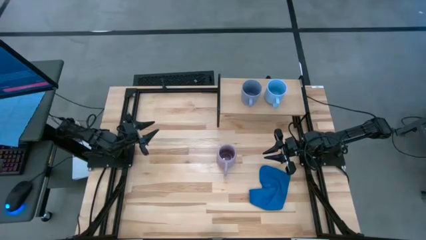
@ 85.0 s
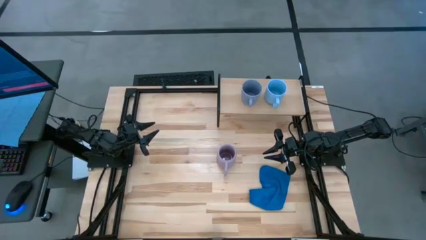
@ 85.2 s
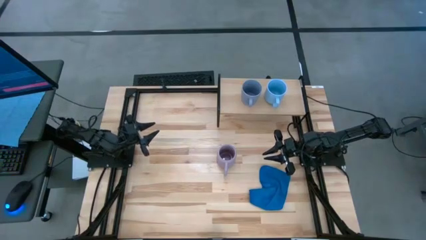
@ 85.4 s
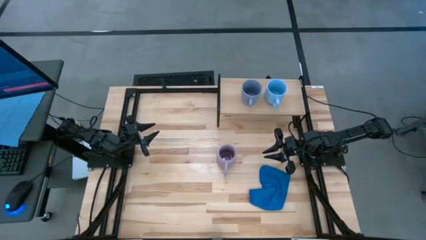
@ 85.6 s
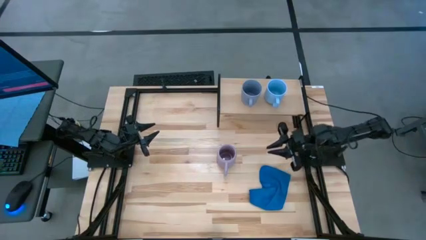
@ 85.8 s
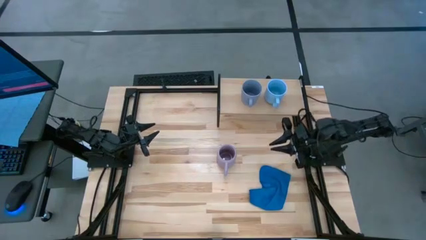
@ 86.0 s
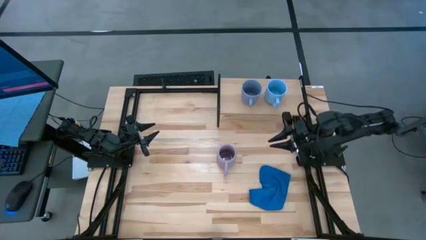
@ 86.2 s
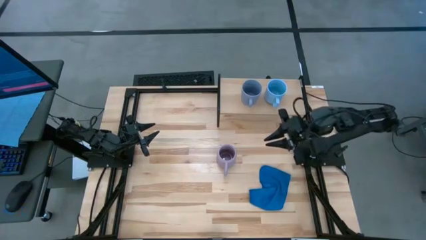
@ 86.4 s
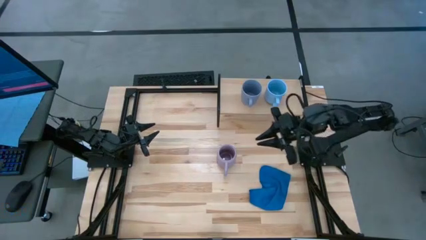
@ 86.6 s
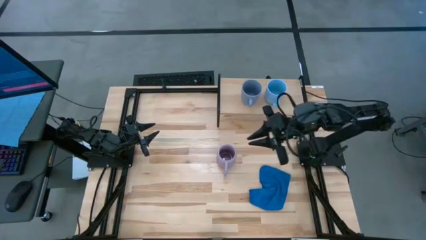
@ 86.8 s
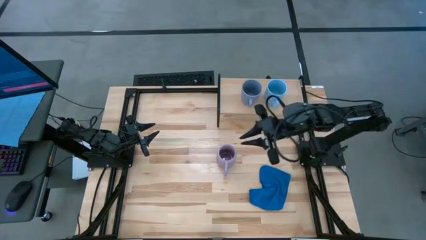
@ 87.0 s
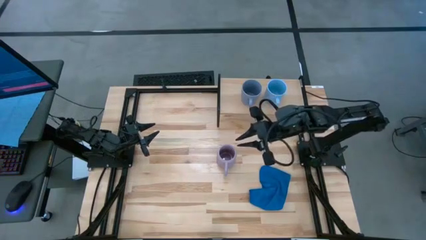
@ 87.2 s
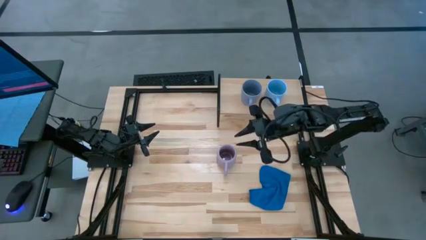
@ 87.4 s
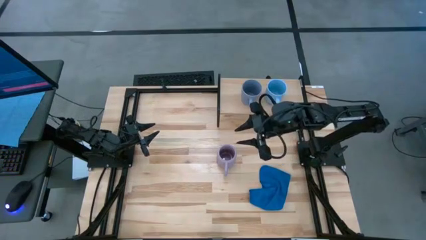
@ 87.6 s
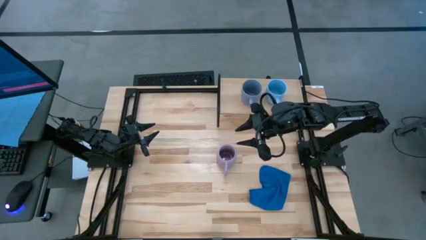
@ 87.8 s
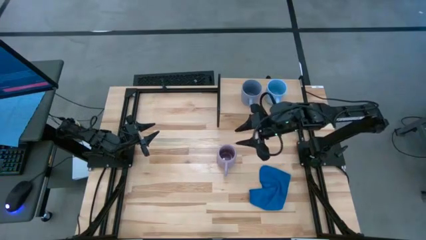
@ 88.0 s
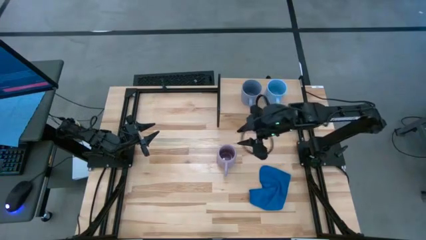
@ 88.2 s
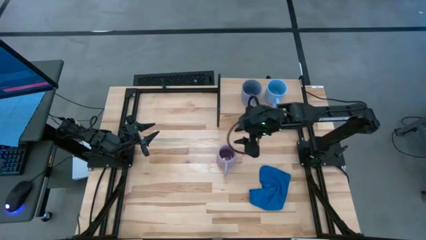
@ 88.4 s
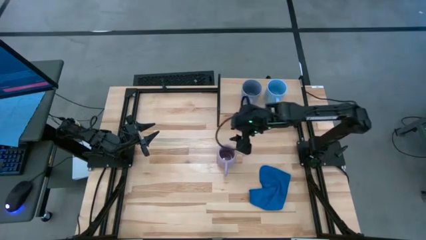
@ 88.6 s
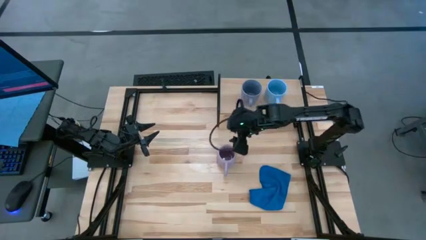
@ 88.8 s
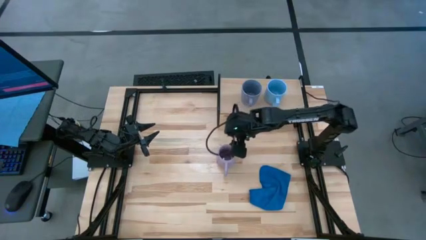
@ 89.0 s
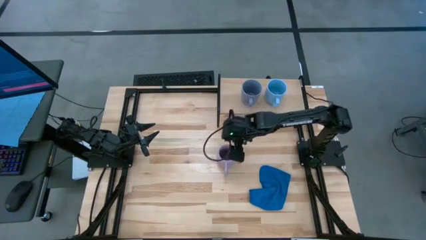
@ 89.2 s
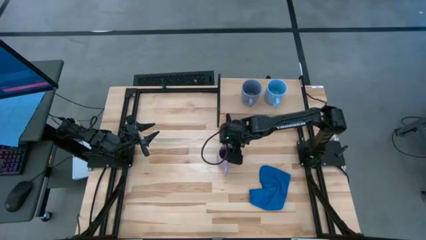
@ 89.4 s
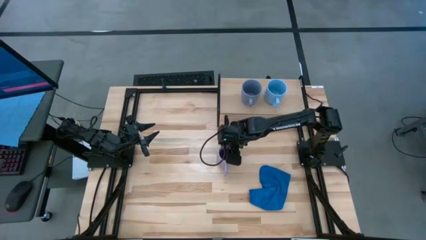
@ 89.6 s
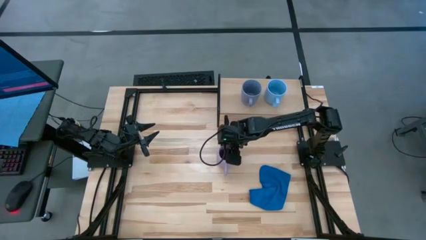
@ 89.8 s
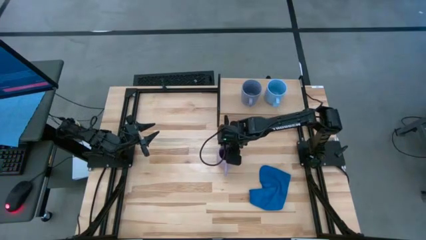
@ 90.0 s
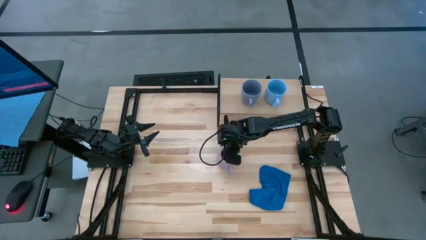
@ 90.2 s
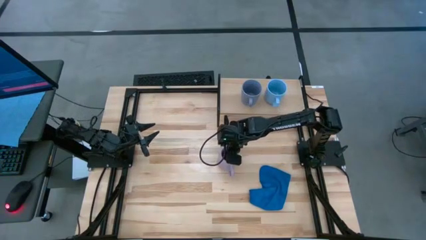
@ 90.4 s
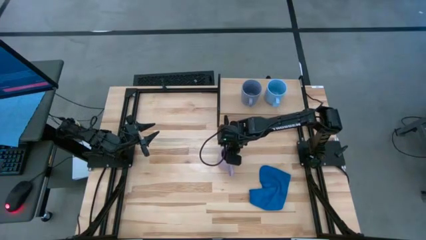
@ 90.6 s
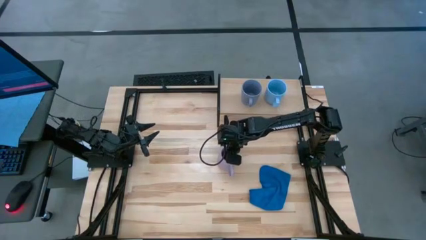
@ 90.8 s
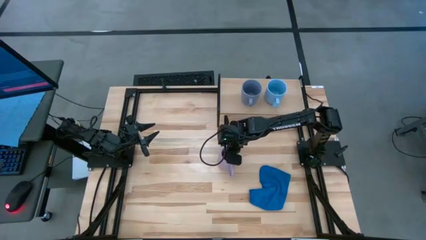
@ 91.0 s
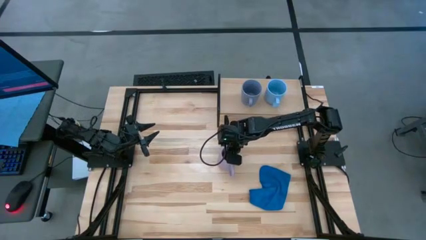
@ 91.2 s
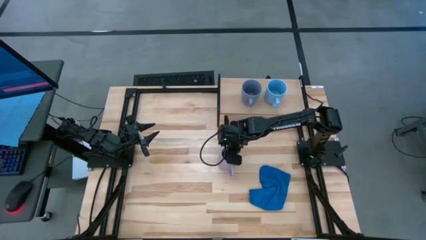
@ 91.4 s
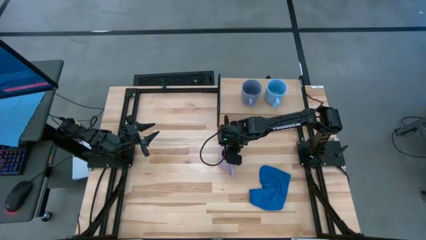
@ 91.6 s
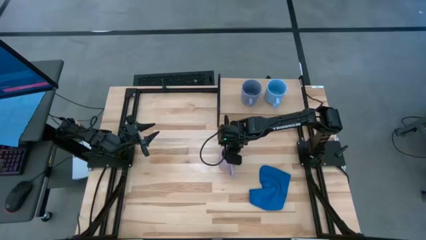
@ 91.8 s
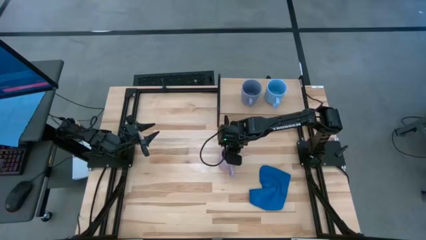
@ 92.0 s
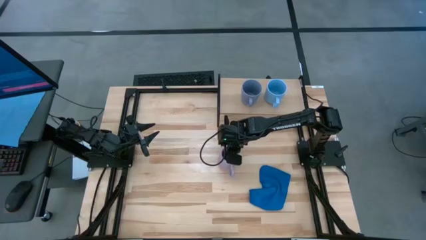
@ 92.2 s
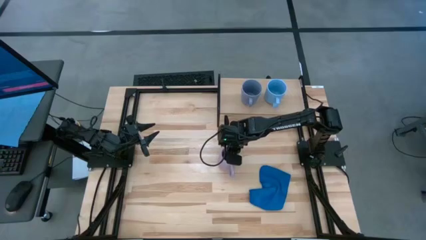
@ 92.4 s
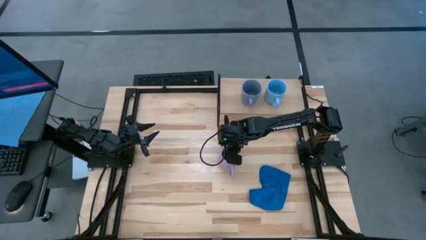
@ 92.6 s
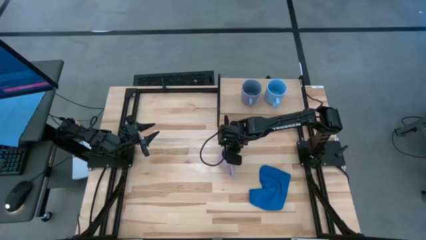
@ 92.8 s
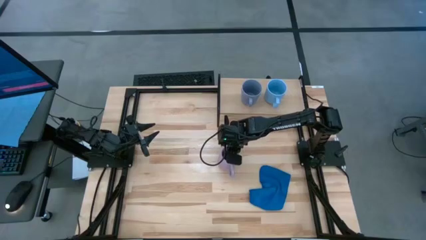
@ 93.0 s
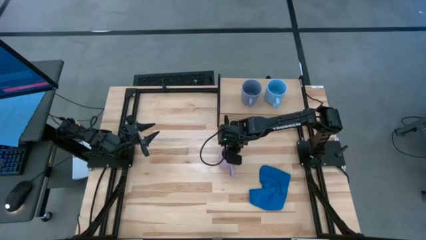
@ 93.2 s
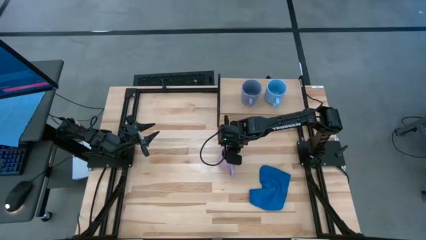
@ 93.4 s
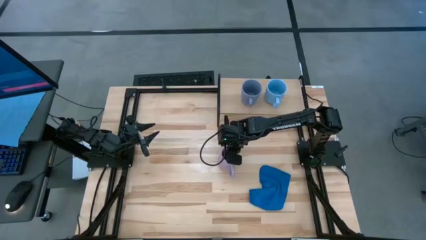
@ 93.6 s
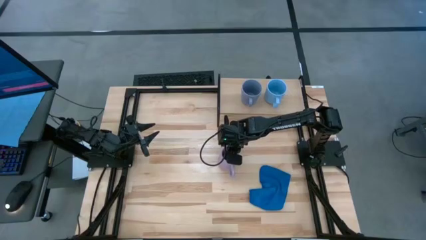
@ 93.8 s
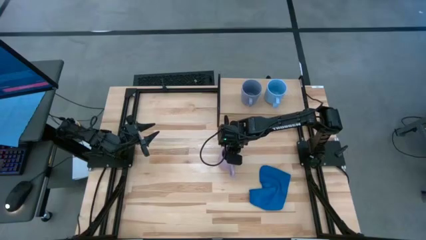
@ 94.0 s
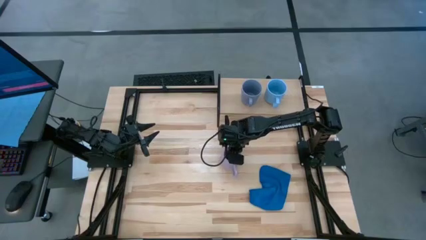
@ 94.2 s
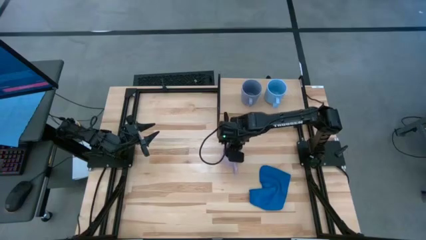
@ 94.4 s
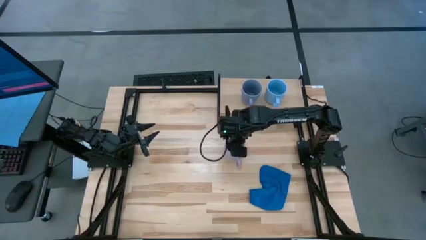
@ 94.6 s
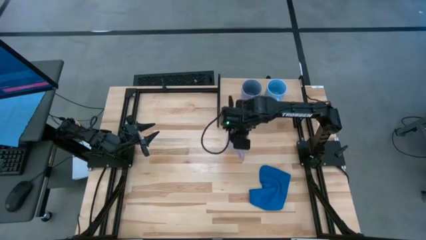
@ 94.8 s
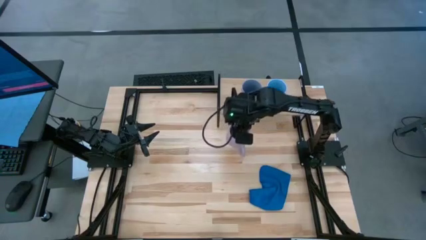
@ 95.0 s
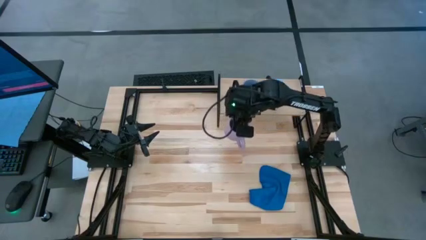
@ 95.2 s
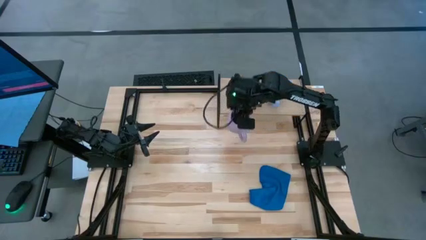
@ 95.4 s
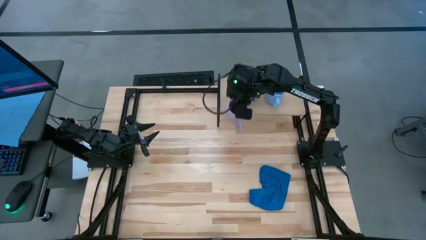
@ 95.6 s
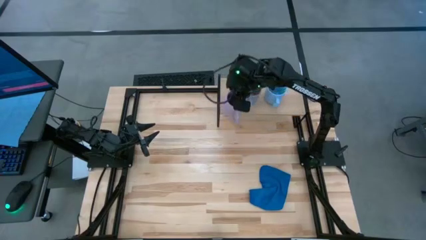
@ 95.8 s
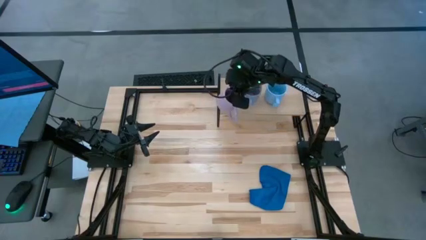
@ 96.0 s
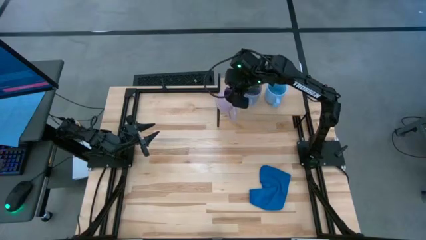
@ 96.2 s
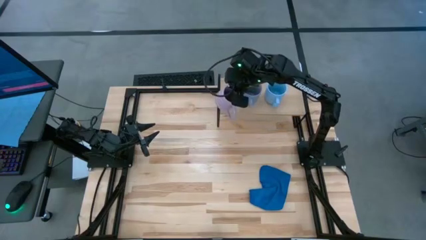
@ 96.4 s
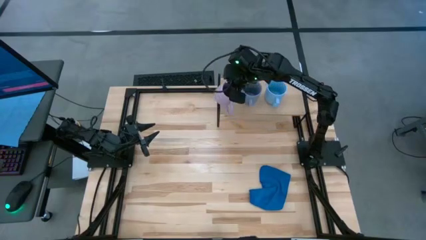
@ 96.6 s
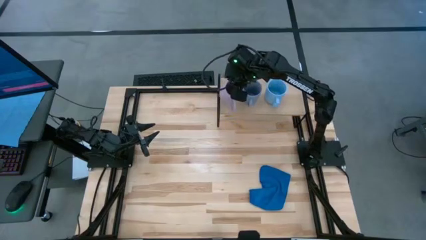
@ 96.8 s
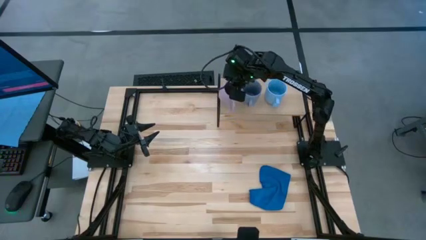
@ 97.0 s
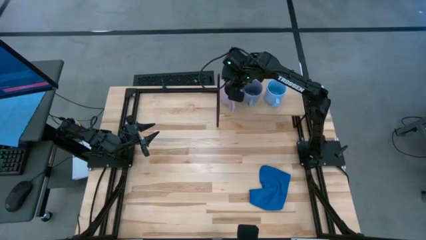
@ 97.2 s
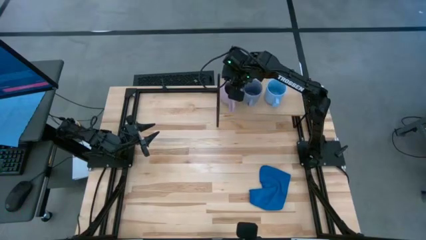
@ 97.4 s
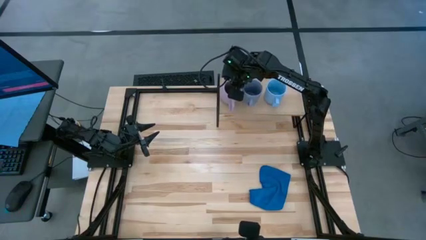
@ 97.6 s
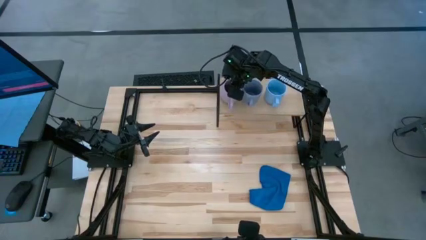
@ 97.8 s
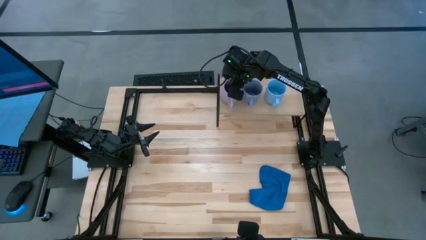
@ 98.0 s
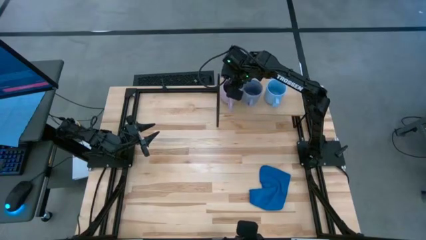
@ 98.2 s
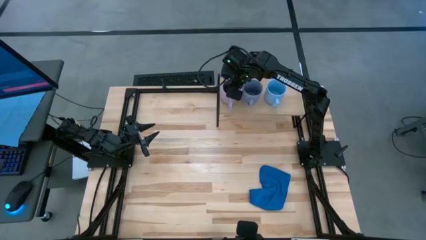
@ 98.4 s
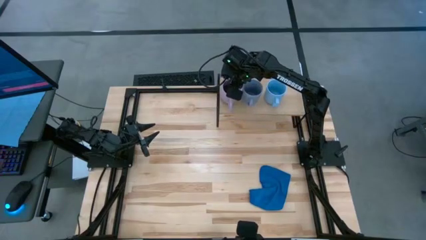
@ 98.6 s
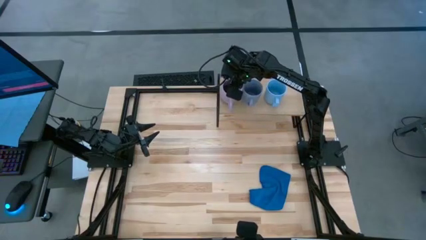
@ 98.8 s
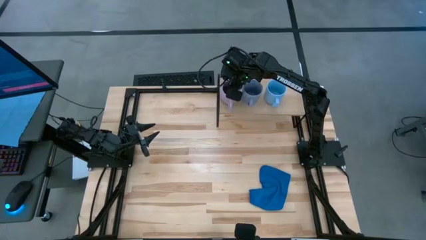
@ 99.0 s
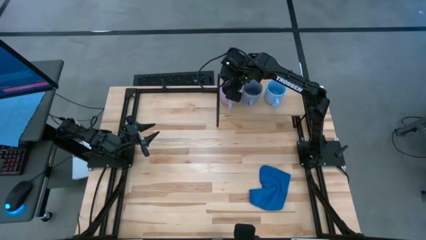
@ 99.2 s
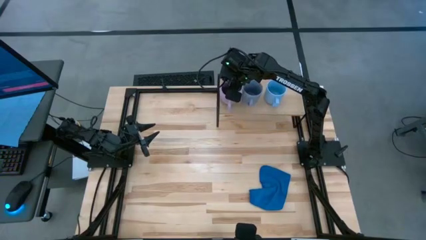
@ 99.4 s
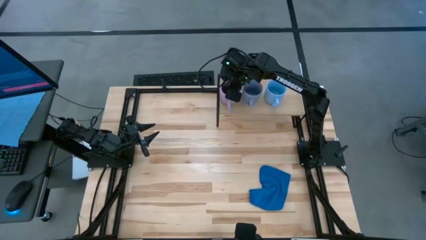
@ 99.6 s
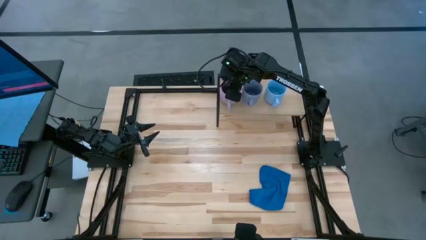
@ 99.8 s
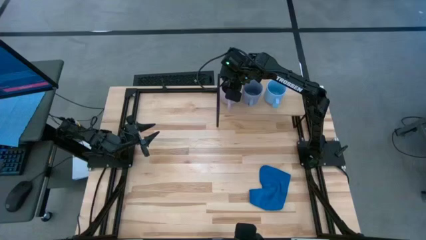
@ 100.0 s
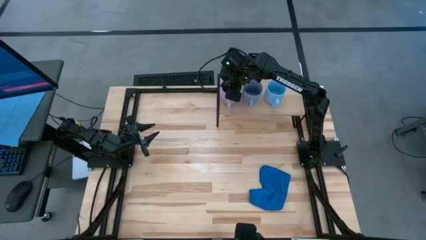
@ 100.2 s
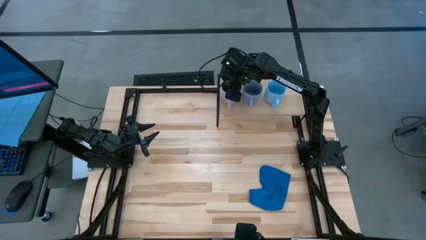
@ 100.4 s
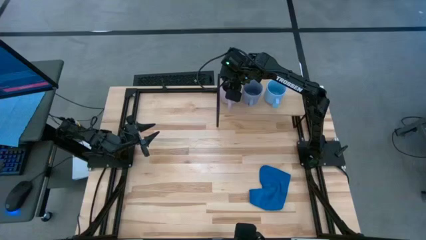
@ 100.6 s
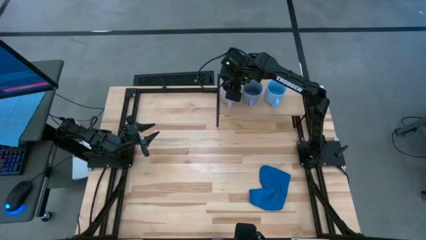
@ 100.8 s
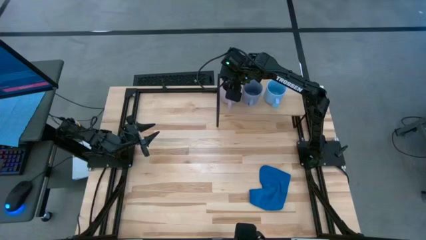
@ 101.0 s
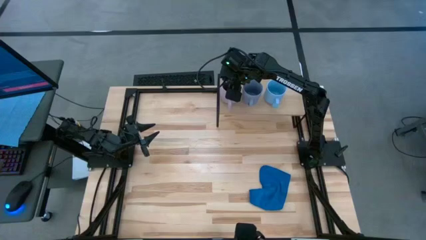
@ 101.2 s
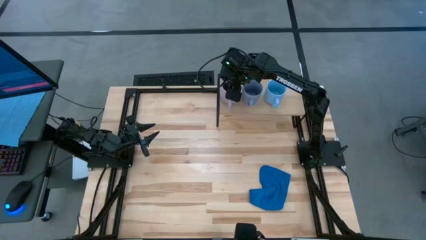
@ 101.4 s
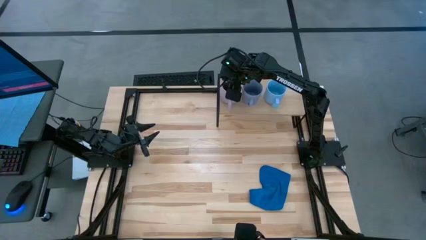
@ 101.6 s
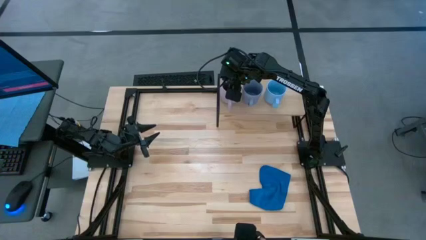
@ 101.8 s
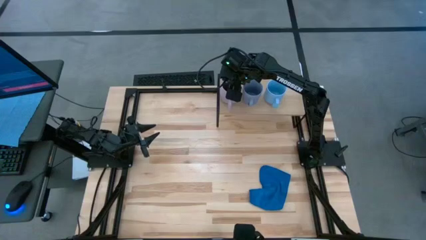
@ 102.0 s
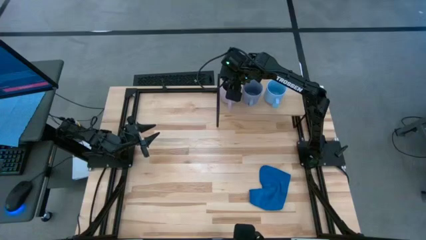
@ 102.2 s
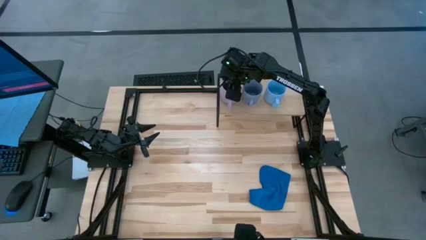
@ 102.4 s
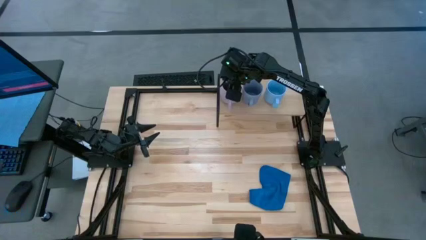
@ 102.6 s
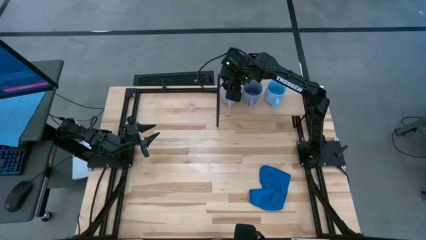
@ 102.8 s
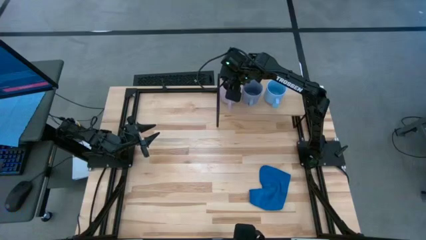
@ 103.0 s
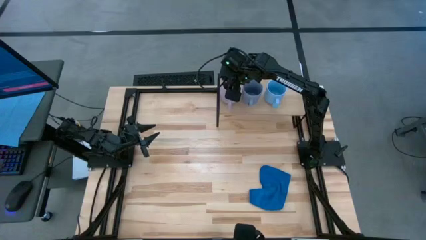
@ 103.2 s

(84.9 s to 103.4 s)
Task: Stack small to large cups/mugs on shelf
Put the purple mug on the shelf
